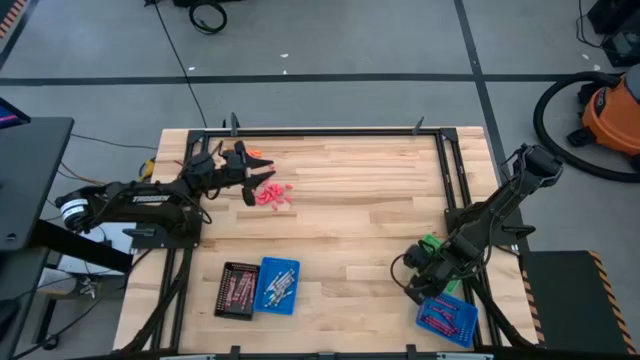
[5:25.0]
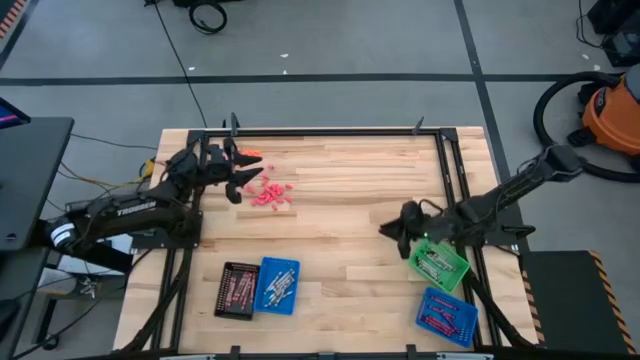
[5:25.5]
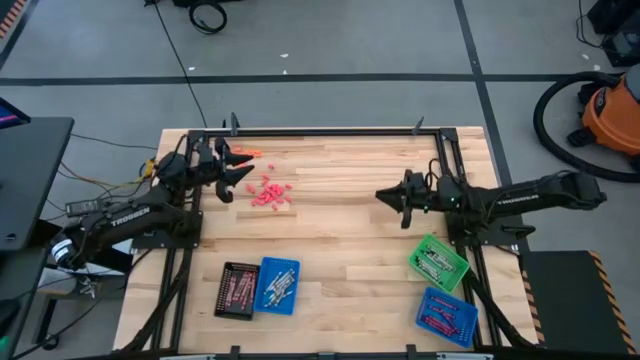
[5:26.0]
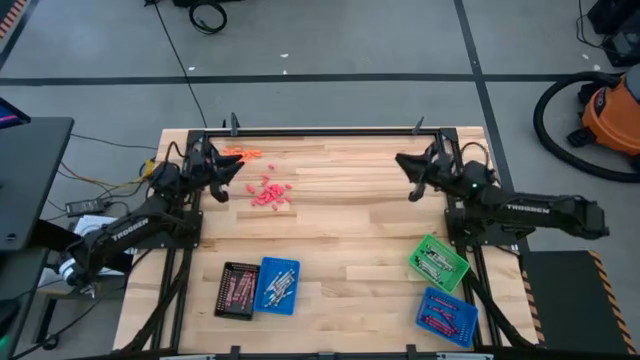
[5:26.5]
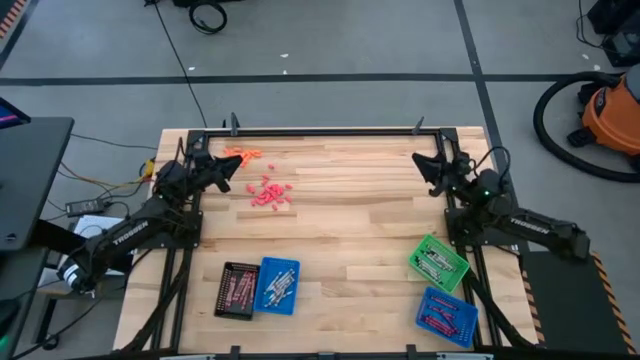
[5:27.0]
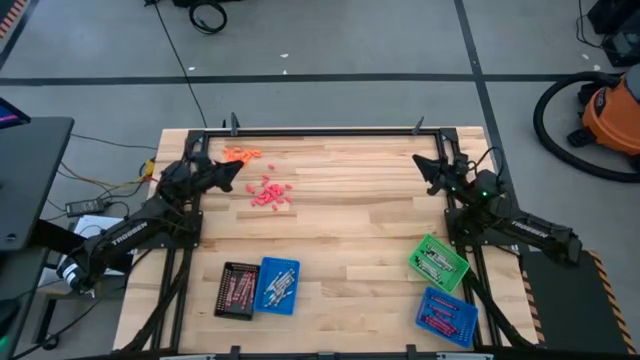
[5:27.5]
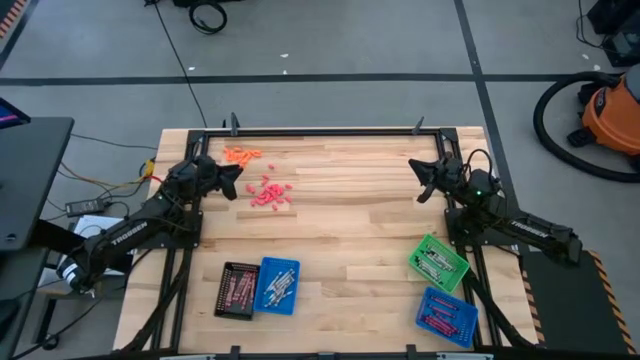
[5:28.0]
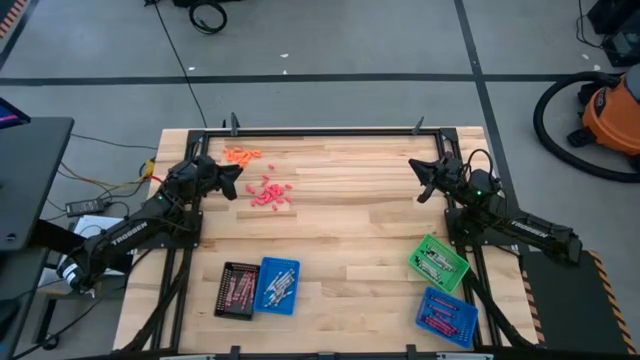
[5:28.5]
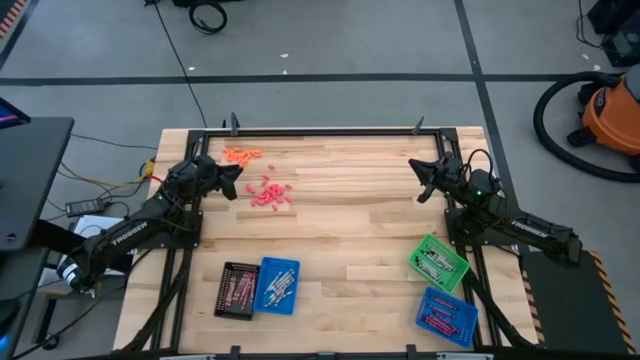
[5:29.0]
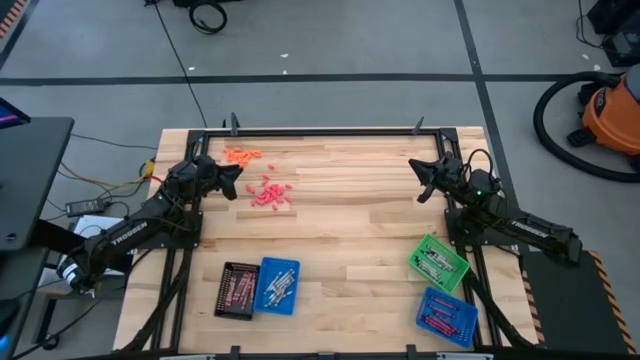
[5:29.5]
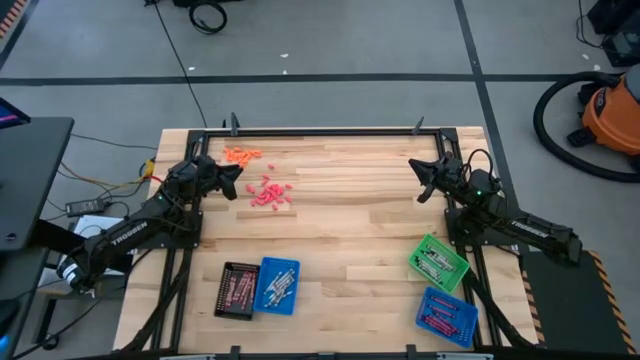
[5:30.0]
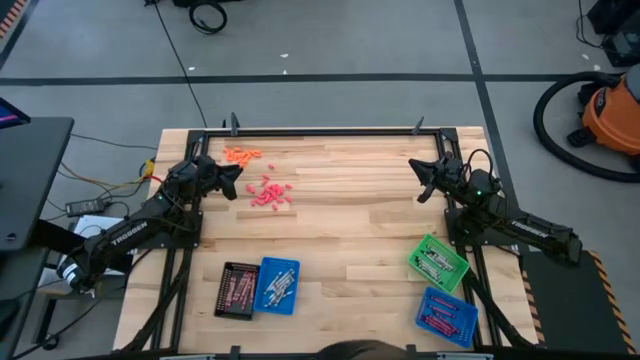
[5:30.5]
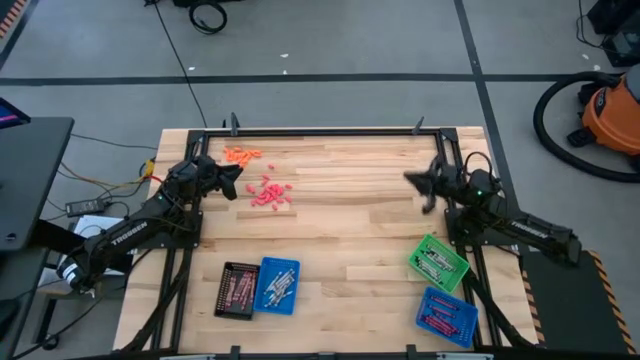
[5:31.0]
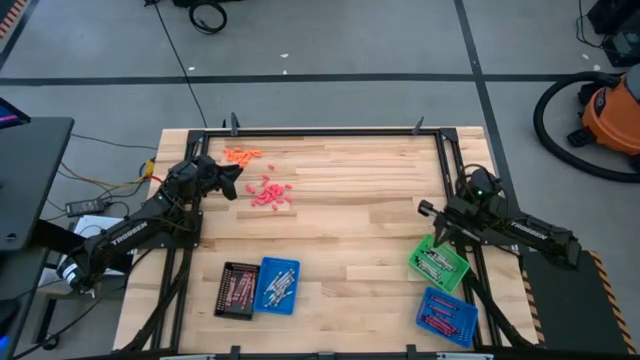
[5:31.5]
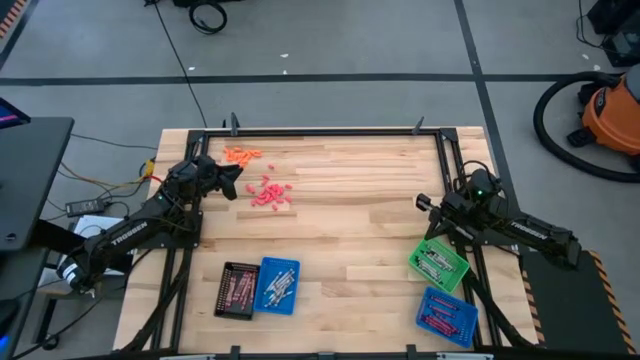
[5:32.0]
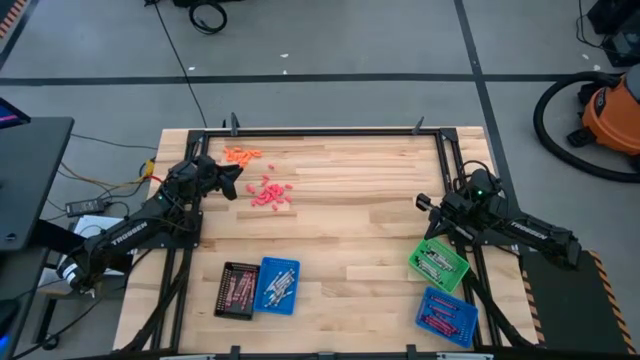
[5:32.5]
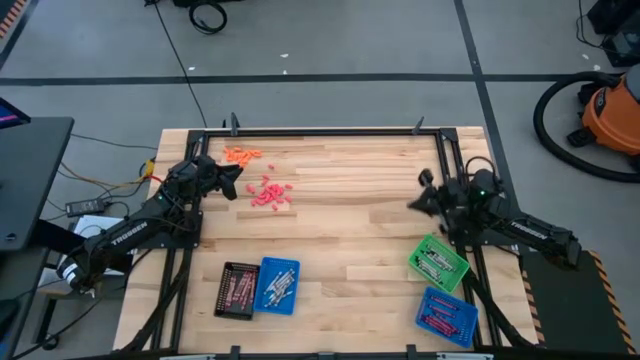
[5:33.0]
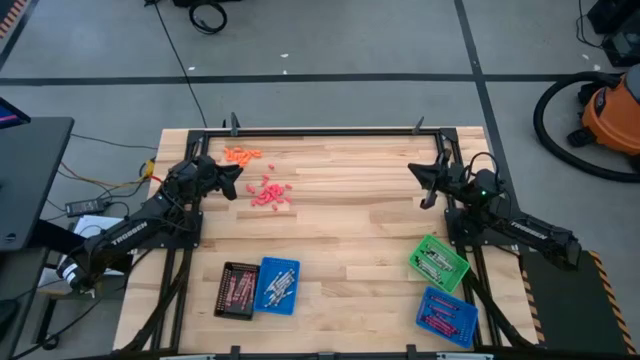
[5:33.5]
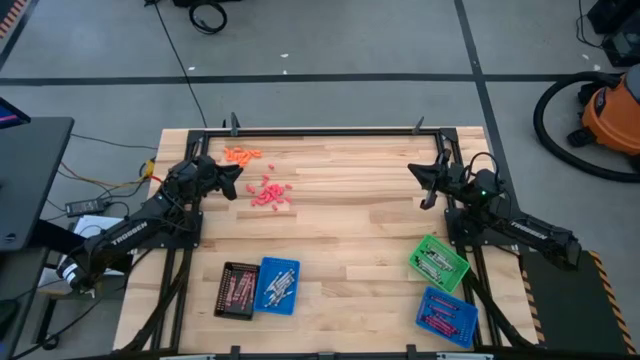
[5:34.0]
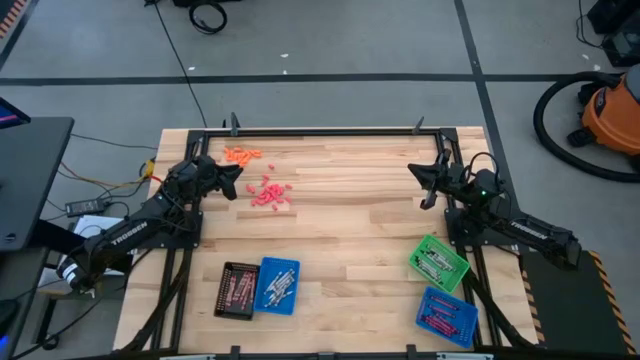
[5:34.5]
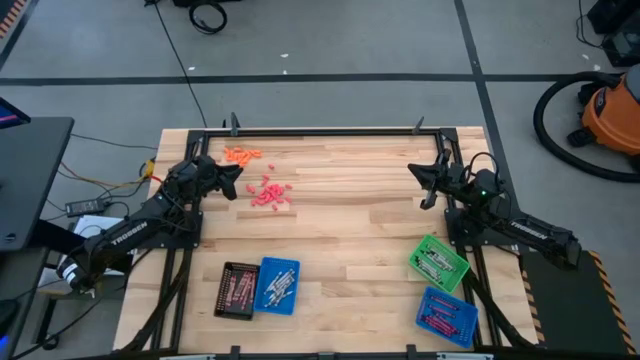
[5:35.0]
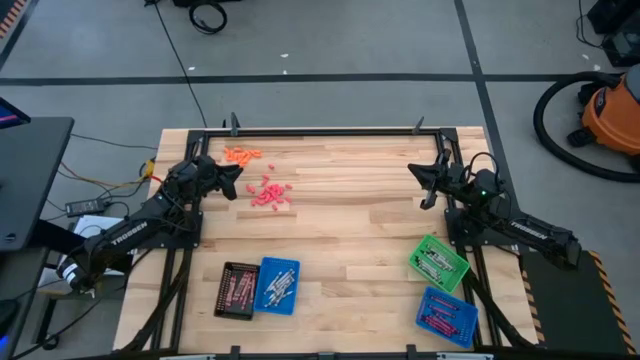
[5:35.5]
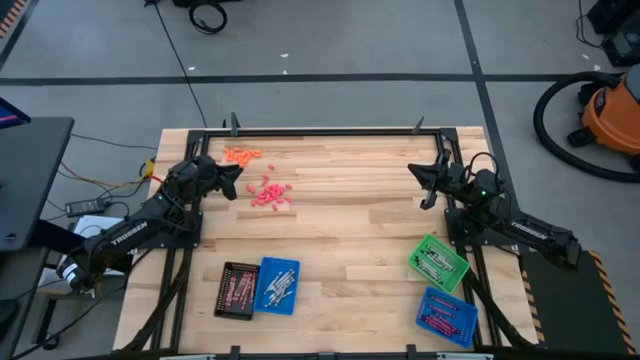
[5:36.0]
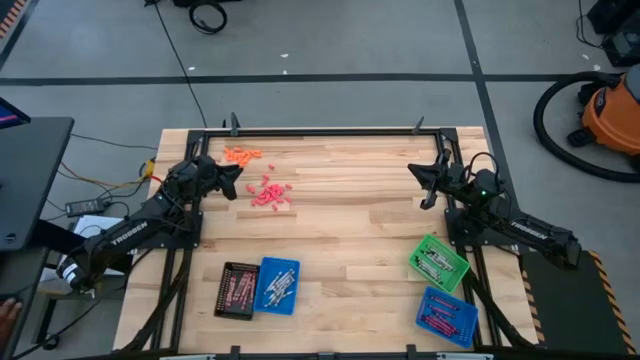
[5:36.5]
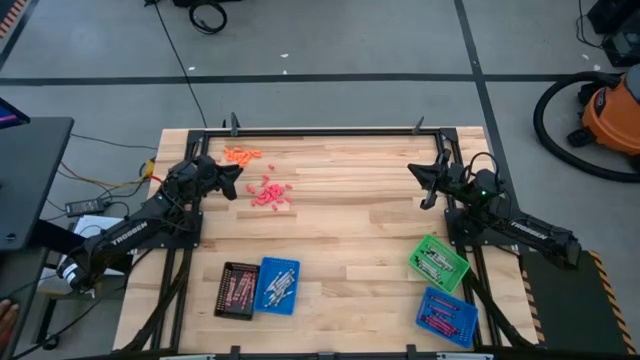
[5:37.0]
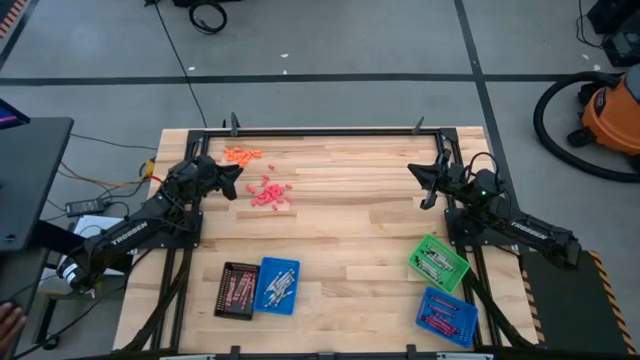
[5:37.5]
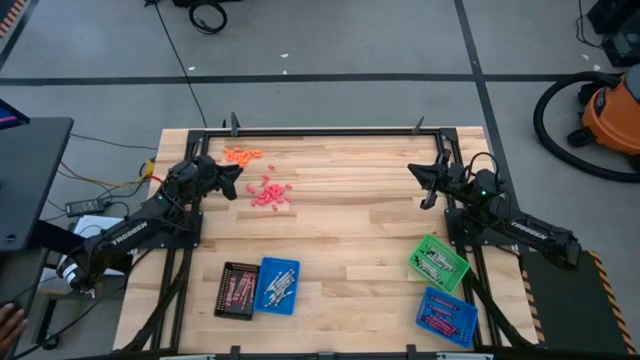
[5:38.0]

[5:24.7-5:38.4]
Task: Sort crayons
Return to Home Position

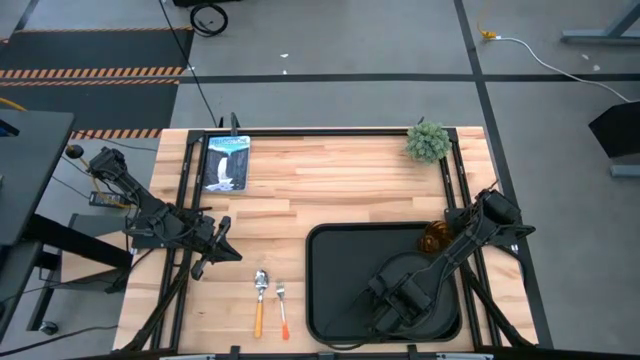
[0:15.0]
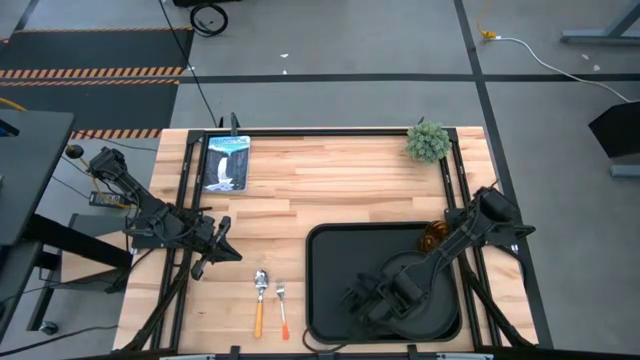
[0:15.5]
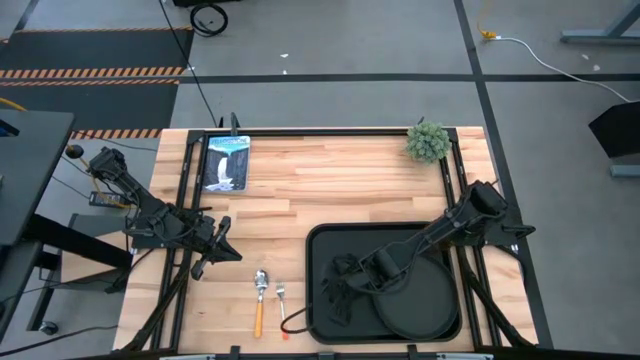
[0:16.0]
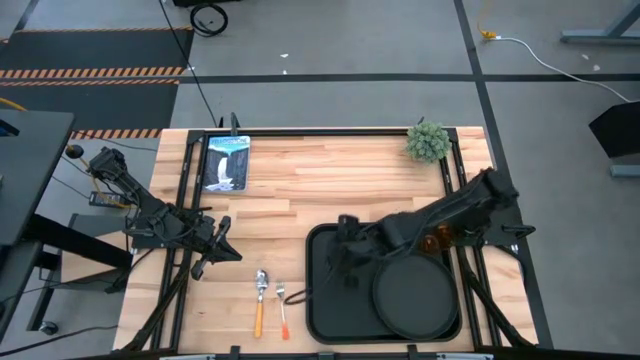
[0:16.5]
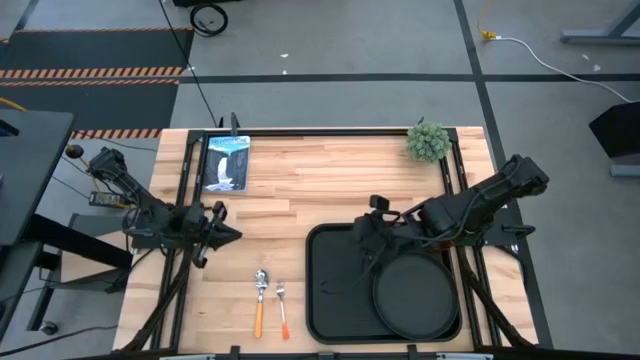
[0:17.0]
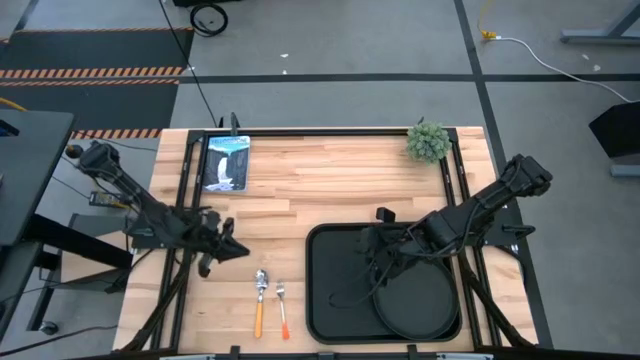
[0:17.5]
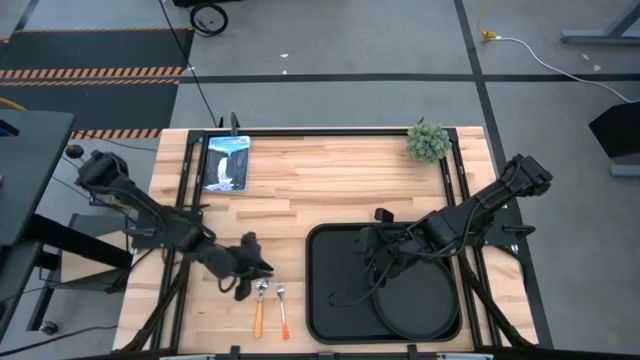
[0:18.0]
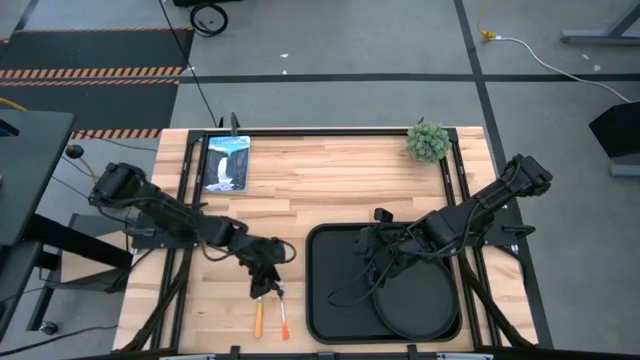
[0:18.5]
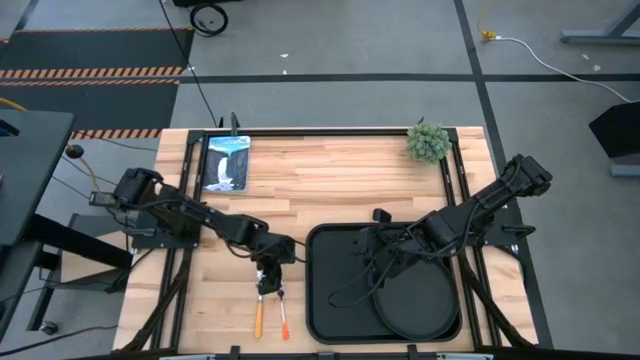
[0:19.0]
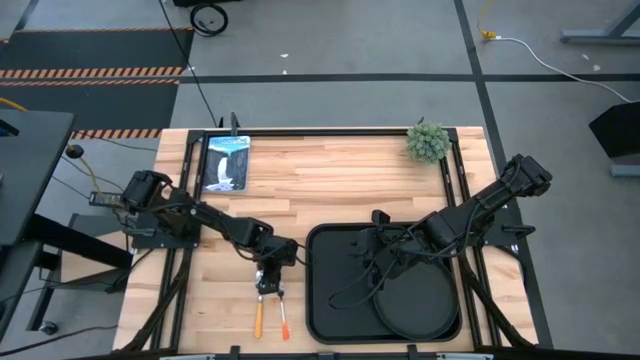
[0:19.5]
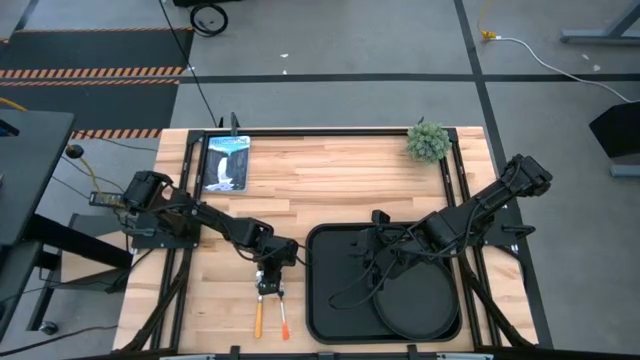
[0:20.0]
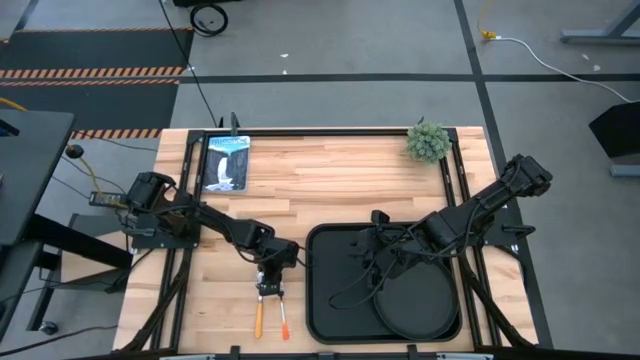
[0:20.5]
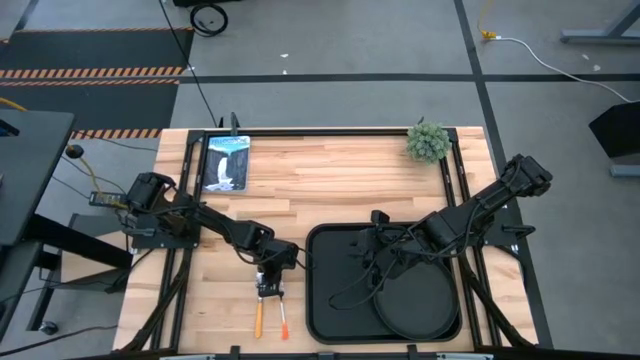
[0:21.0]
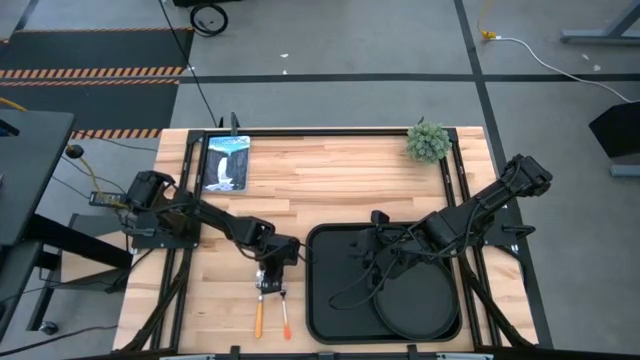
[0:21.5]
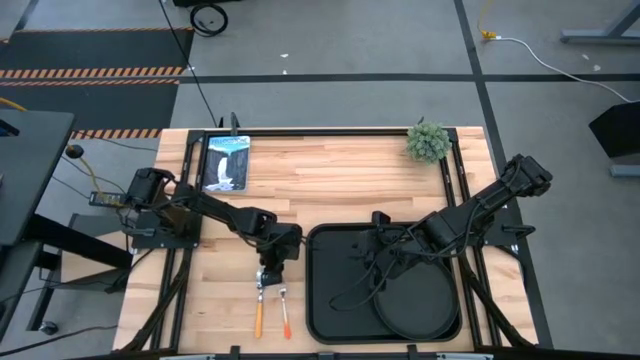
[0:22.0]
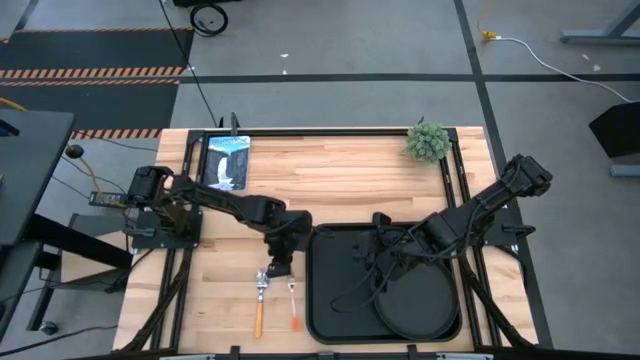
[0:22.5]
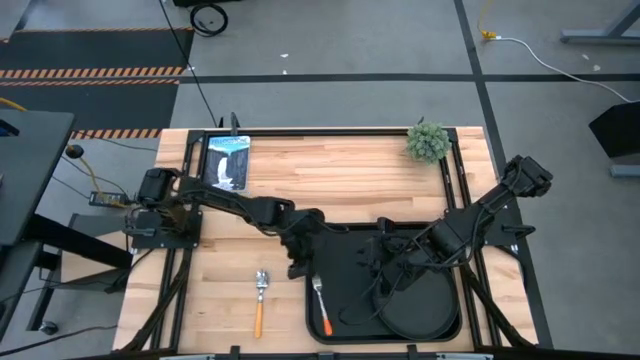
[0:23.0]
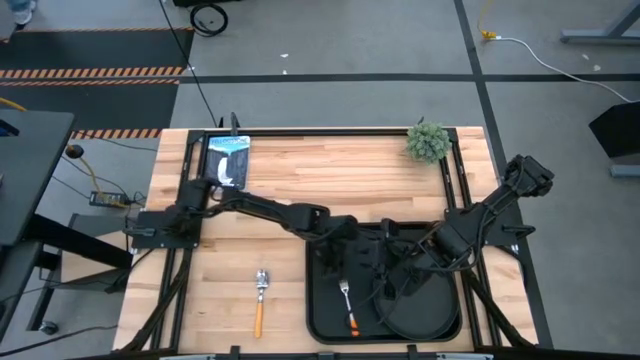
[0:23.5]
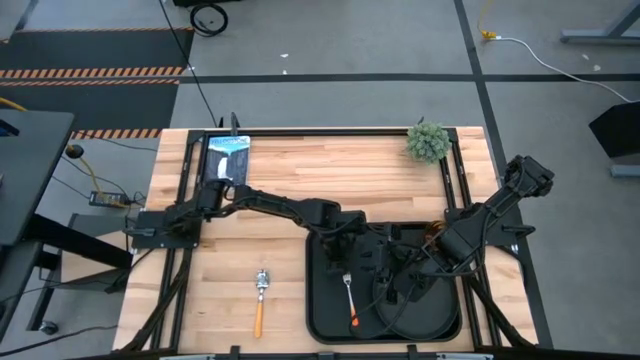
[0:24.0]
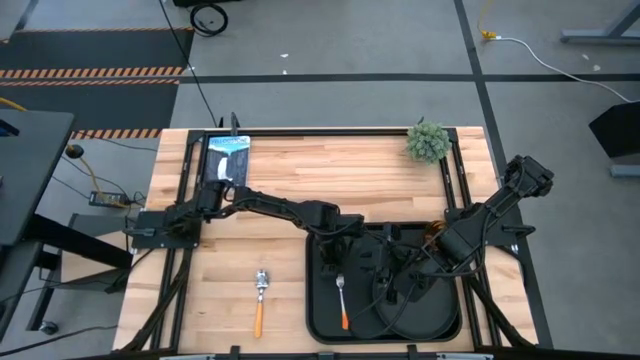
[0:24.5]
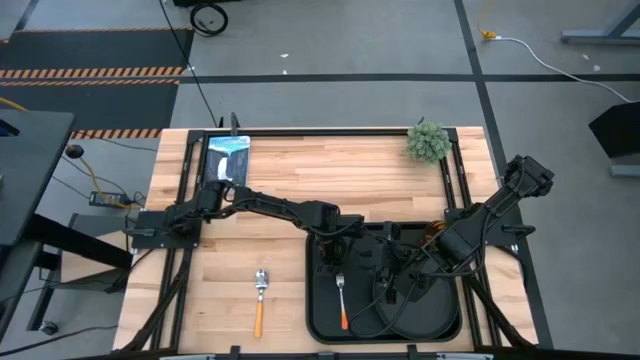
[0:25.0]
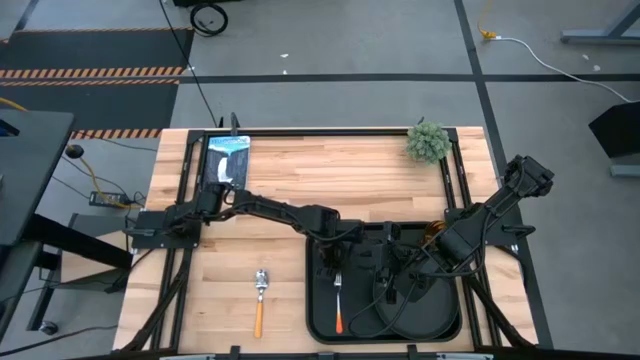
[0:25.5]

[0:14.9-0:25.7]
Task: Pick and place plate/cup/fork/spoon on tray
Put the orange fork on the black tray
